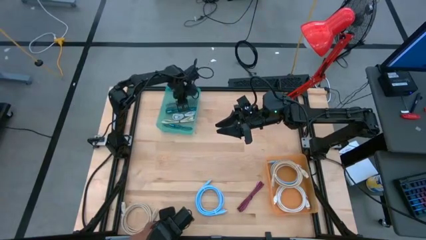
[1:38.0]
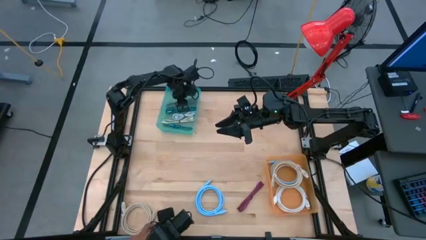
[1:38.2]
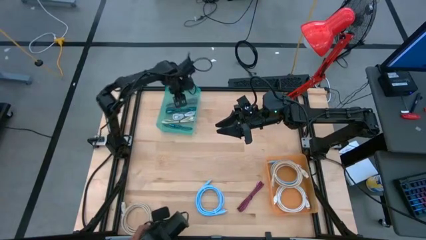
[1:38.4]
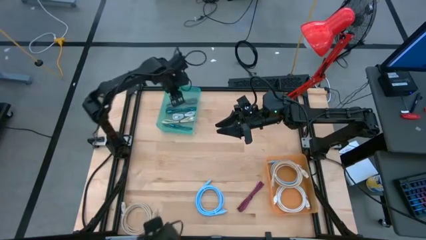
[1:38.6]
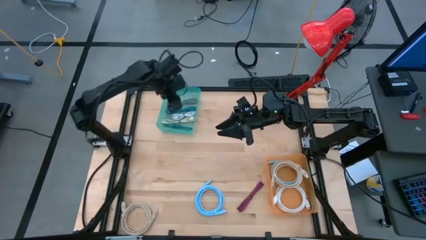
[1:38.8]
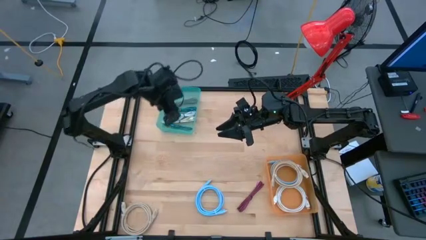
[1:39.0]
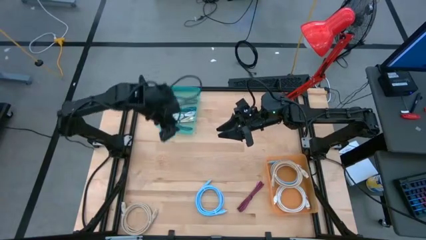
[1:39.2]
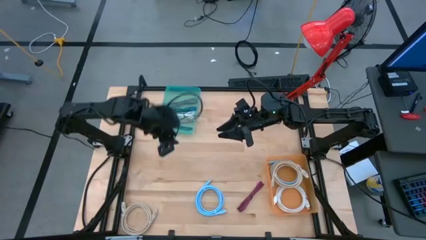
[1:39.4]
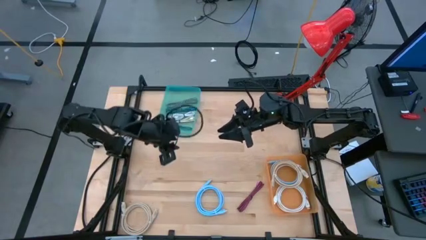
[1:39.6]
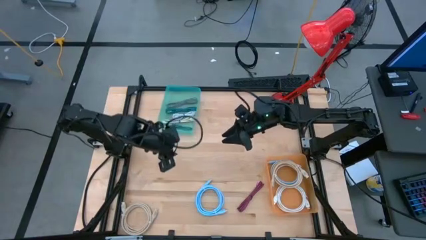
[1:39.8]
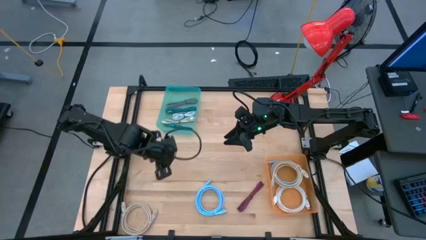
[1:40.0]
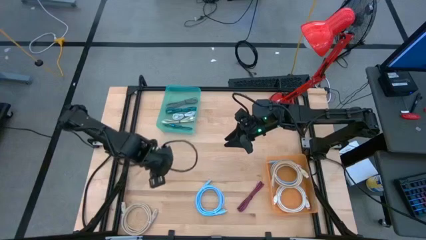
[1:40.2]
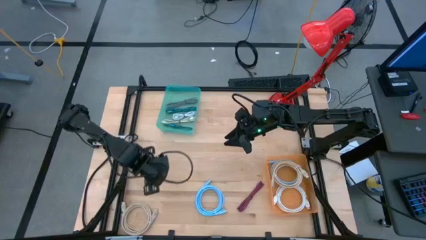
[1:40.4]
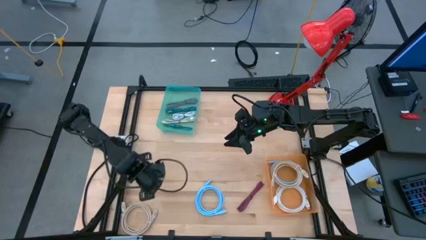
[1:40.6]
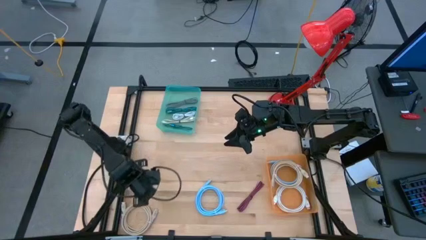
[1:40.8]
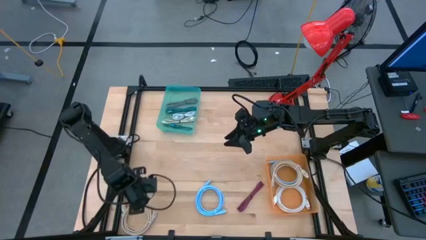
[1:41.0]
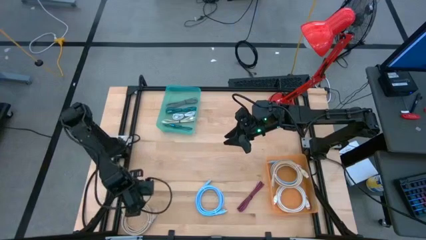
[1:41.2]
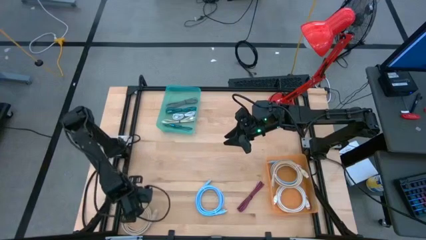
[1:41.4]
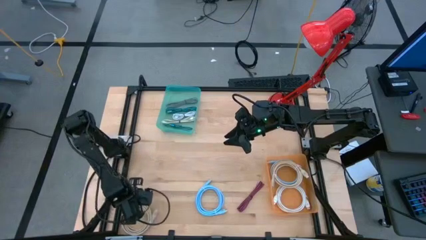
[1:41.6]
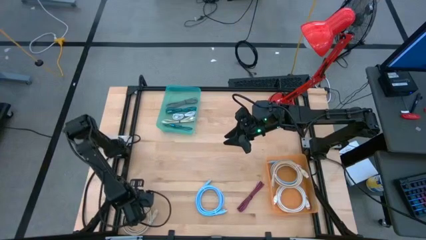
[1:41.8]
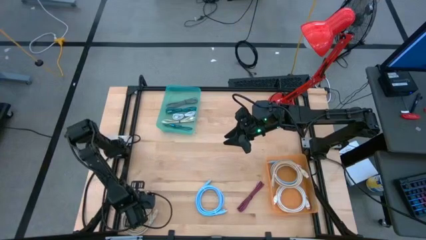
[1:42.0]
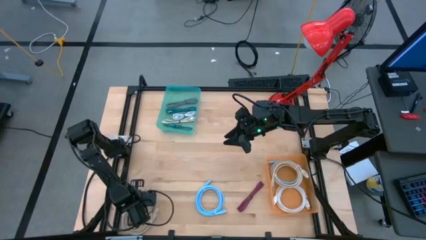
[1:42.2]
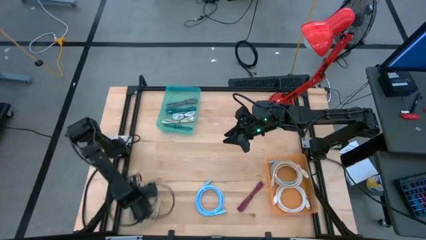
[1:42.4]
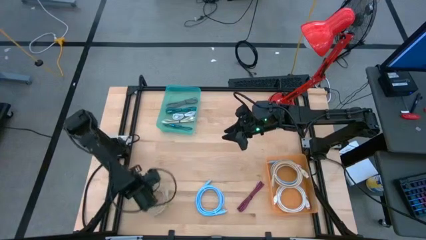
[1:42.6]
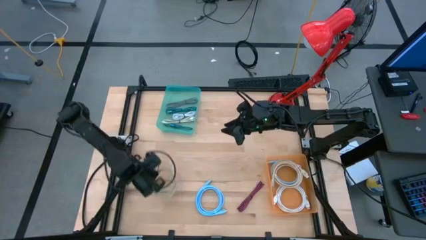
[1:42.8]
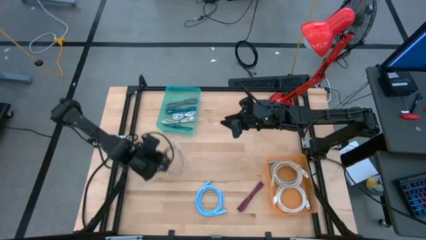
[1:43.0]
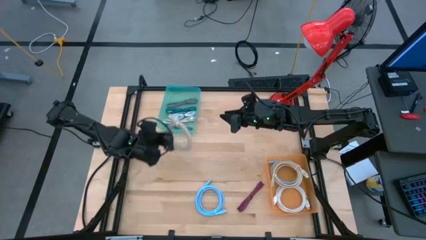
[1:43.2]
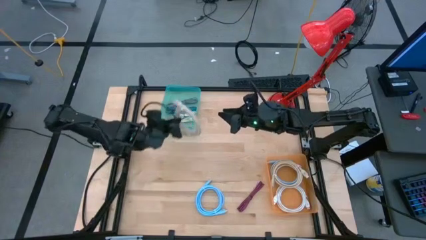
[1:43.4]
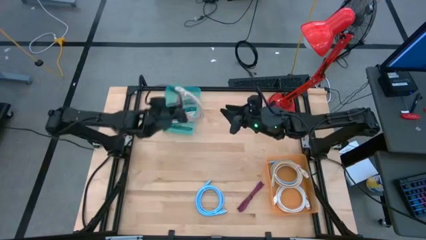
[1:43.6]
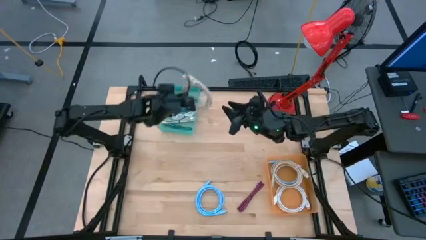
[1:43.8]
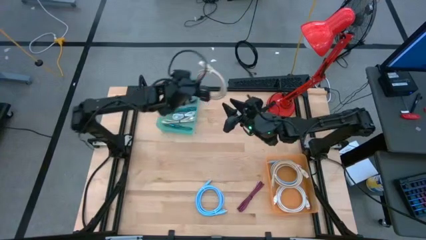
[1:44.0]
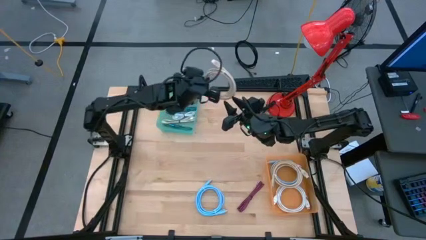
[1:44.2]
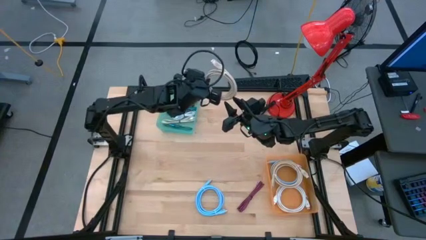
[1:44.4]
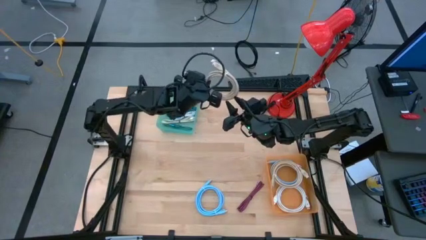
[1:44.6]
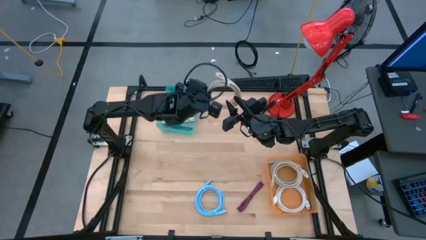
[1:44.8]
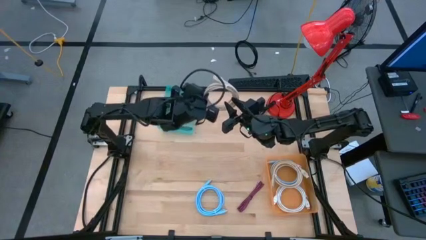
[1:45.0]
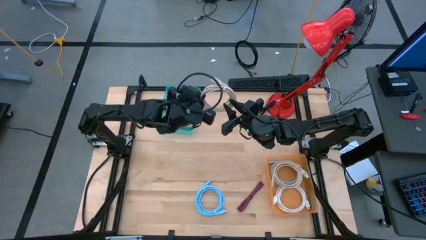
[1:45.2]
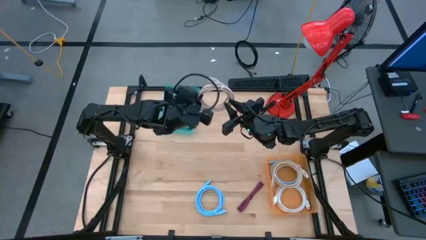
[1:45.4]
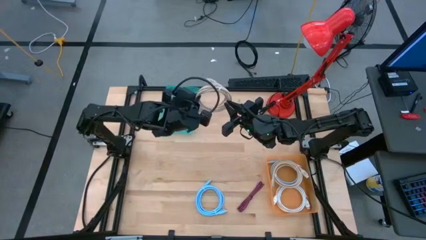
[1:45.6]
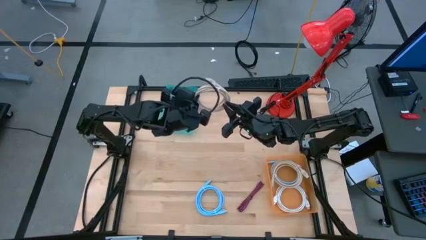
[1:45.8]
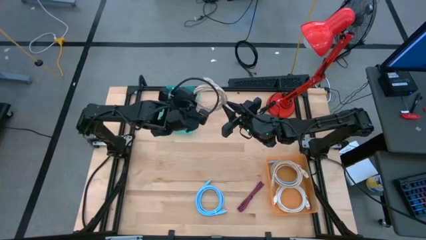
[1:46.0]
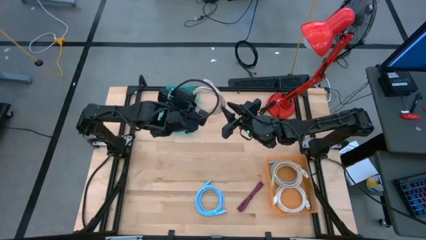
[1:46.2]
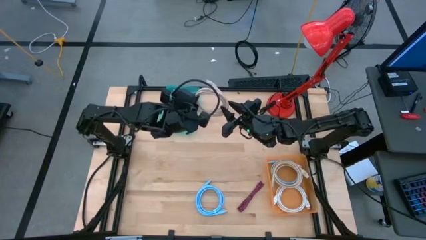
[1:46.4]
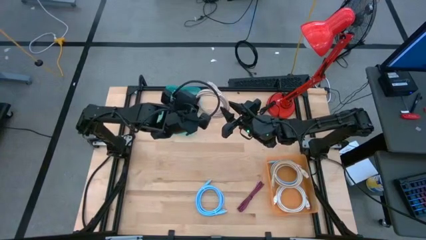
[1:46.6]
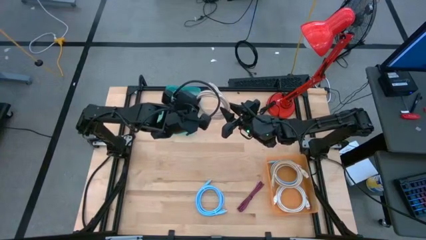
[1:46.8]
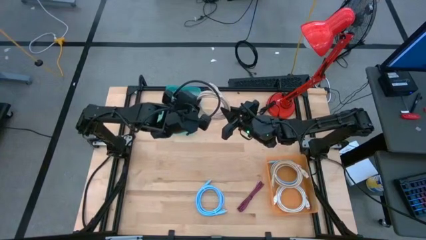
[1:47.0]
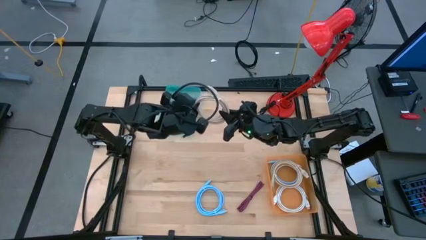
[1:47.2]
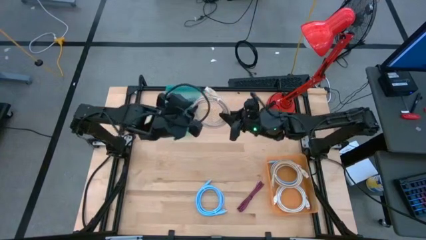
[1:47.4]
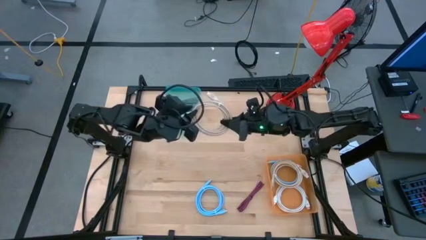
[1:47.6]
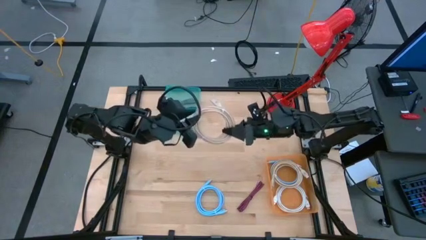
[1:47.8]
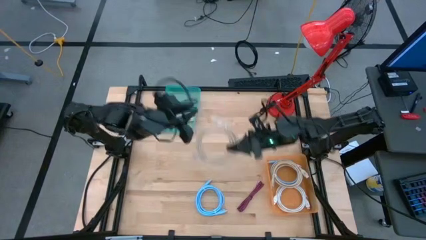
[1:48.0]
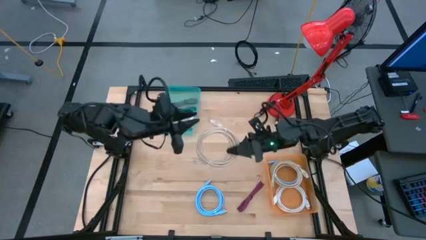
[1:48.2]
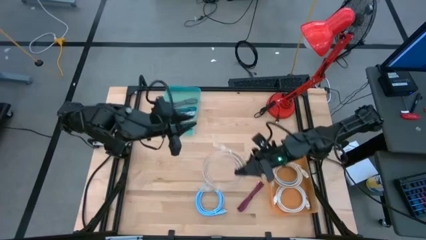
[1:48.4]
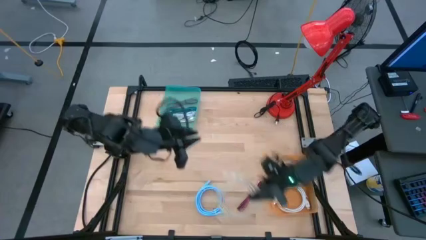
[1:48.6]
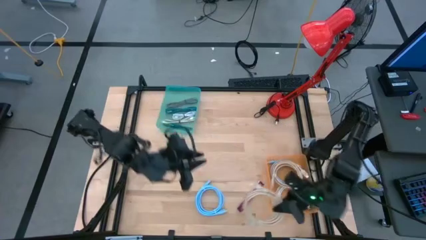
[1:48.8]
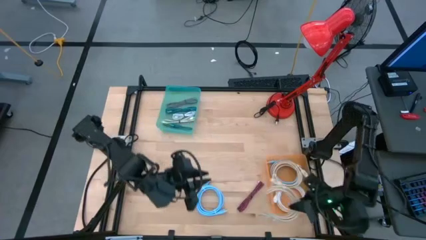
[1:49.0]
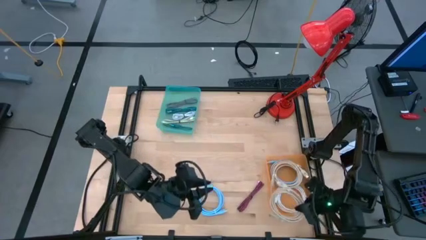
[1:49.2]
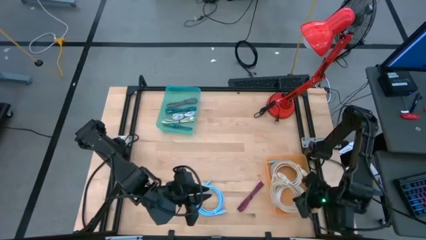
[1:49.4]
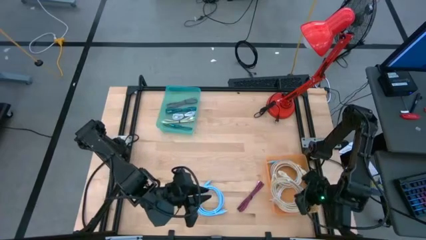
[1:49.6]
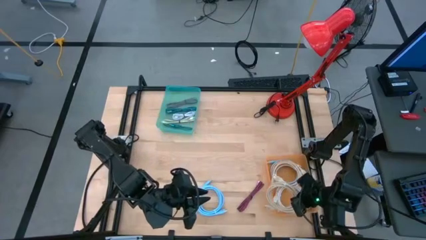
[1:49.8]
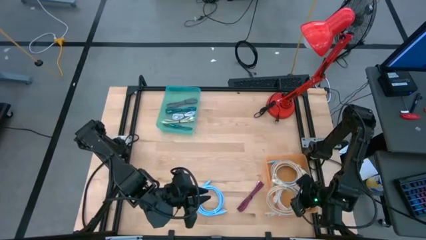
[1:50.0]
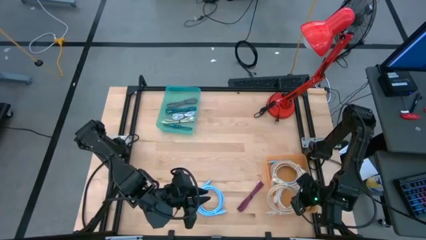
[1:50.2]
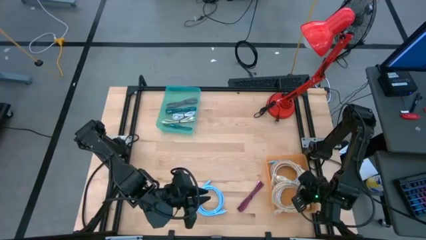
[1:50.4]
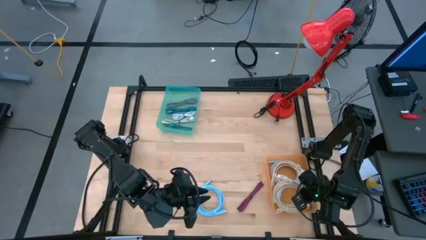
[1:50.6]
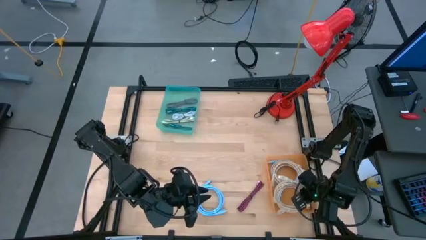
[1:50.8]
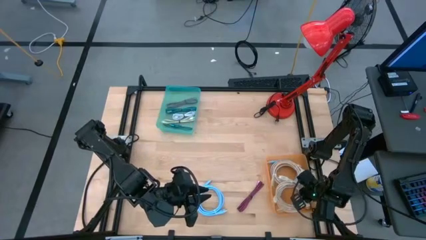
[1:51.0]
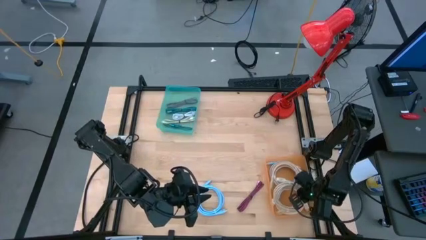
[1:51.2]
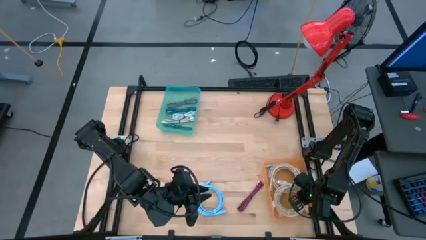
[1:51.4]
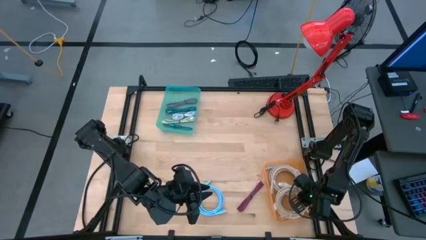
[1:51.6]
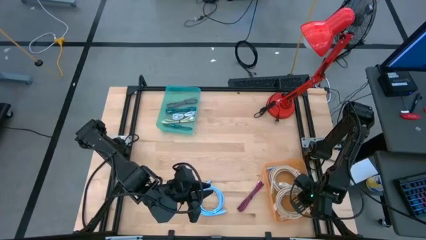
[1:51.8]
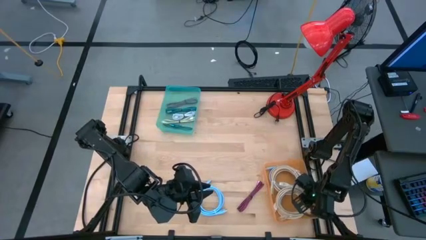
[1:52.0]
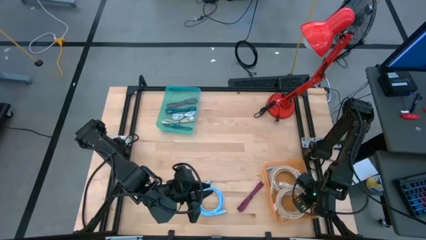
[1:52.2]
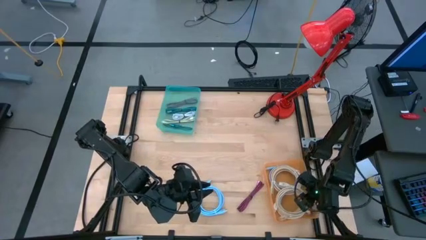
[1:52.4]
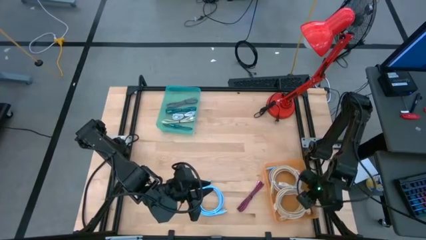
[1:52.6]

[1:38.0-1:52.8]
Task: Pick & Place USB Port
Put the light brown HDMI cable into the orange bin

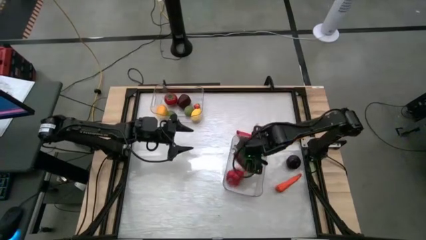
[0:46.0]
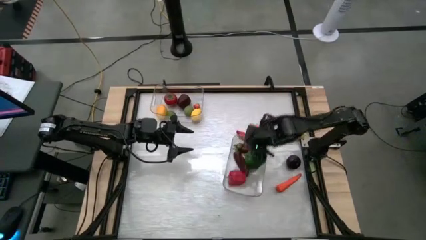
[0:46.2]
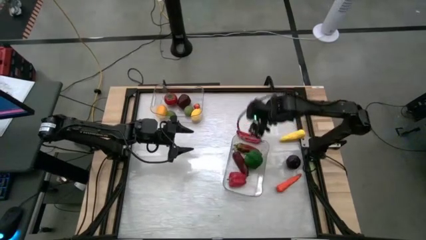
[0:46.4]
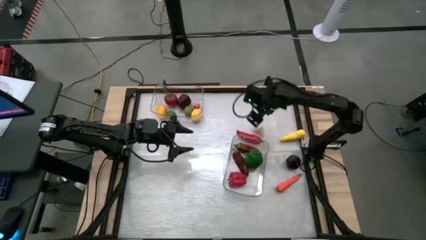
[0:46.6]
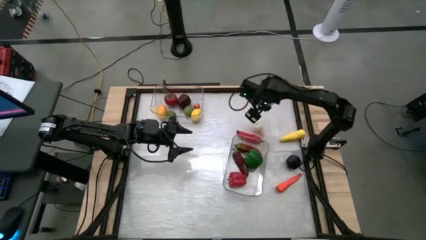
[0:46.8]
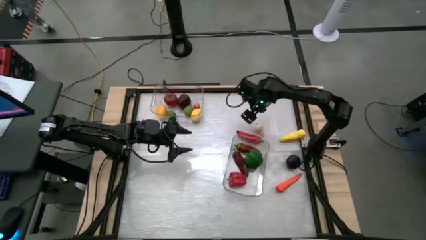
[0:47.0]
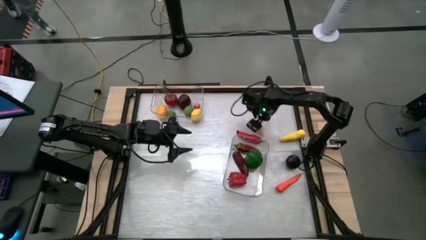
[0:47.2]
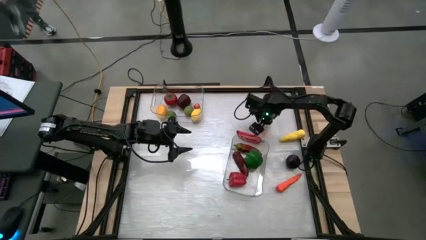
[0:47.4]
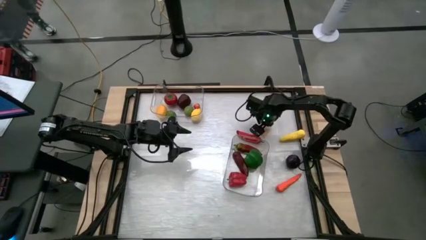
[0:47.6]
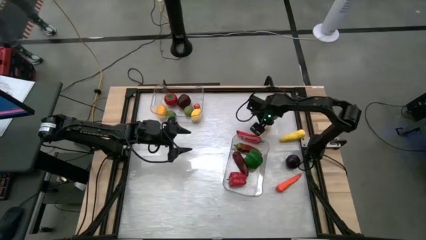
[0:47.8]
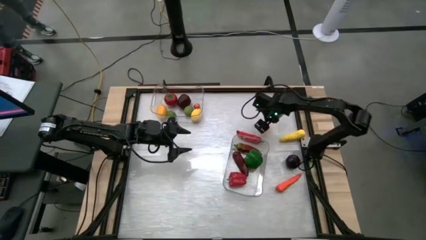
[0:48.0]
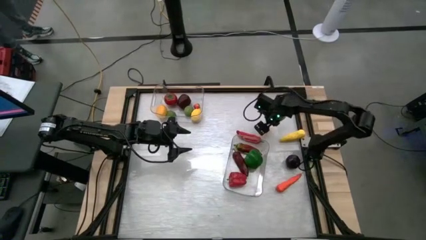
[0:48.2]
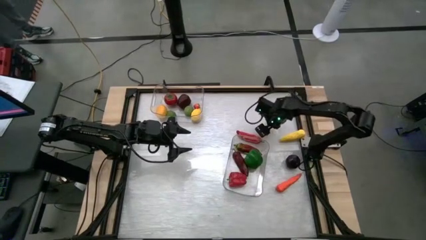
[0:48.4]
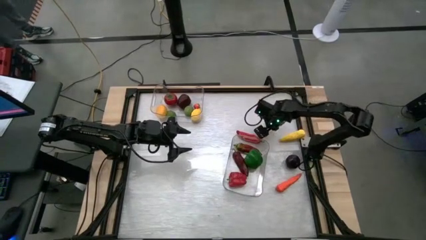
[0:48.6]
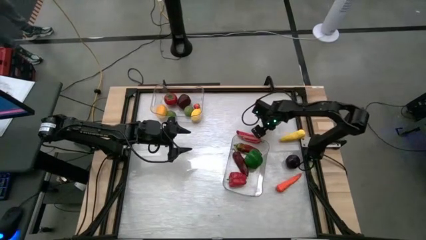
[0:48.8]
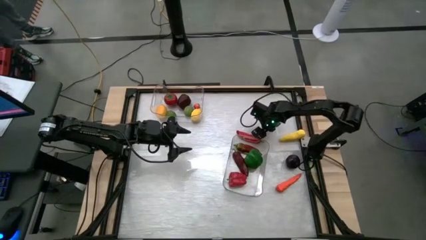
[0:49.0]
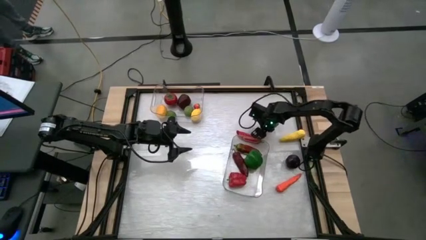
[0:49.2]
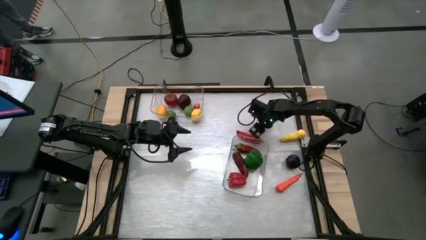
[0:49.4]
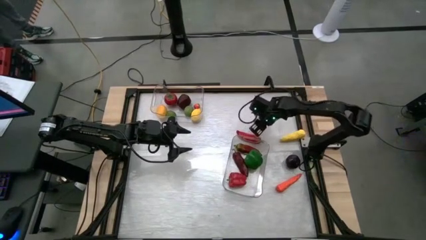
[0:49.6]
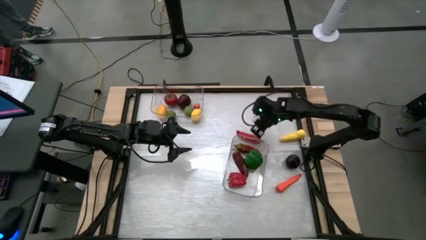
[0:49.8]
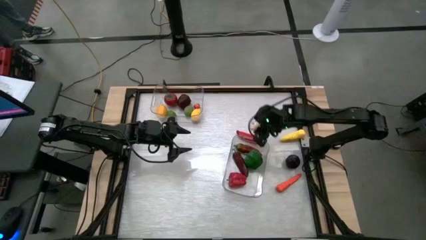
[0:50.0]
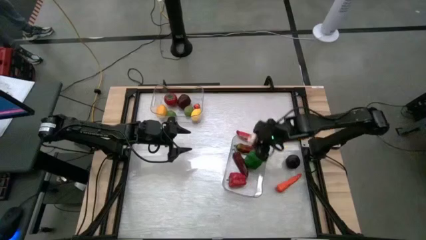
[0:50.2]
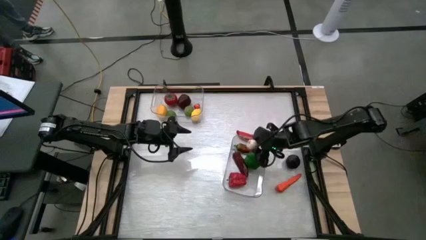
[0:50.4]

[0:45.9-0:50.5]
Task: Sort produce into baskets
Put the garlic into the bottom transparent bin
